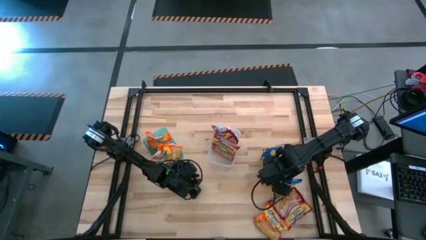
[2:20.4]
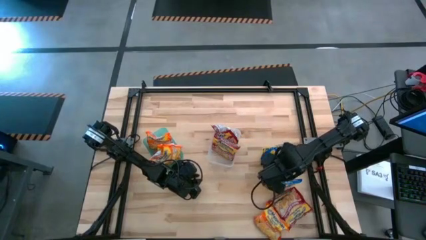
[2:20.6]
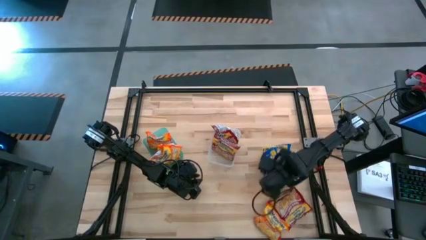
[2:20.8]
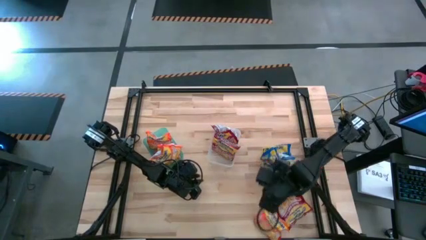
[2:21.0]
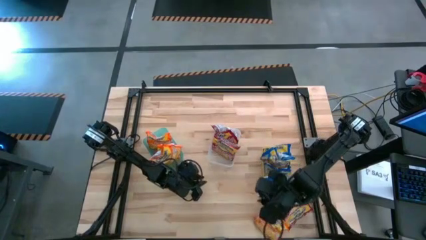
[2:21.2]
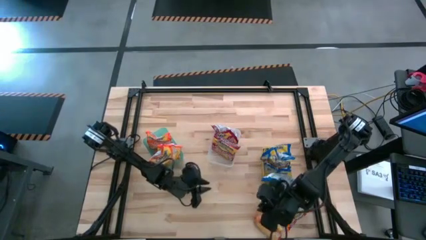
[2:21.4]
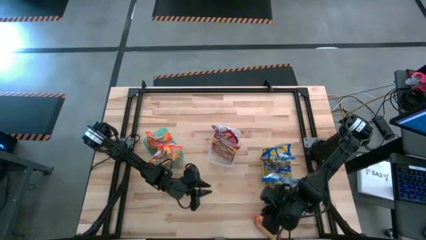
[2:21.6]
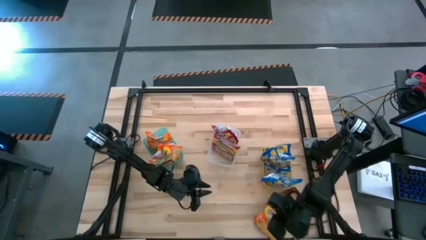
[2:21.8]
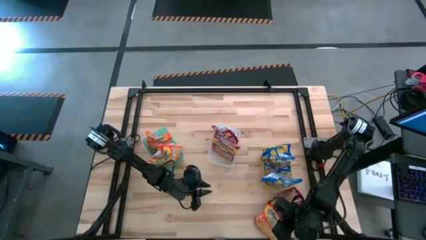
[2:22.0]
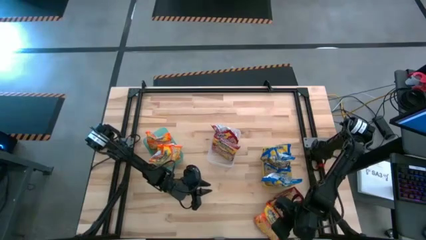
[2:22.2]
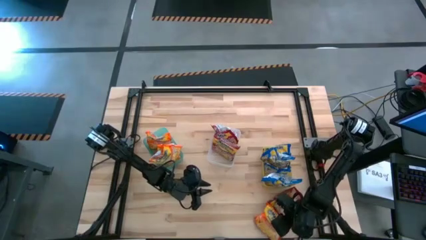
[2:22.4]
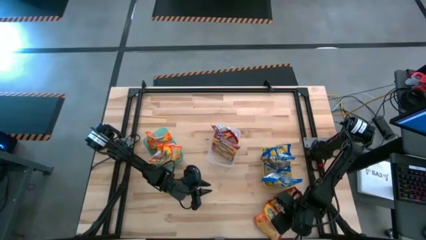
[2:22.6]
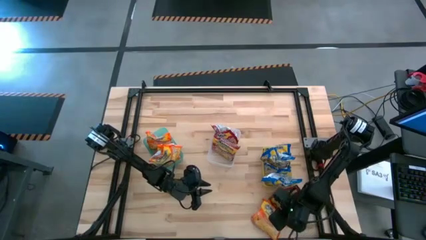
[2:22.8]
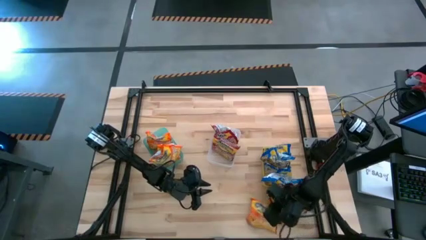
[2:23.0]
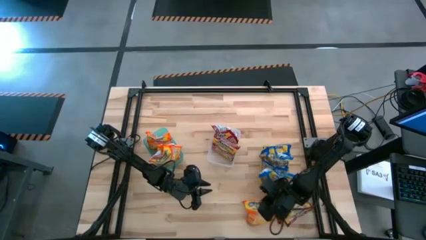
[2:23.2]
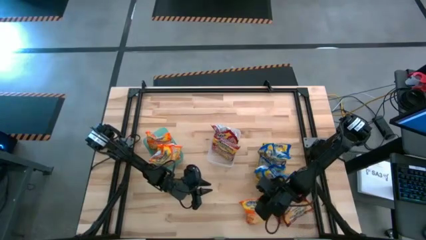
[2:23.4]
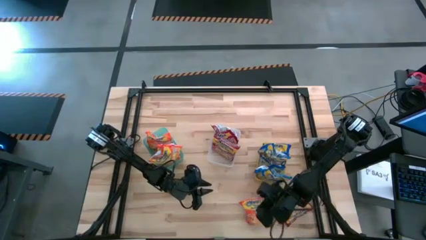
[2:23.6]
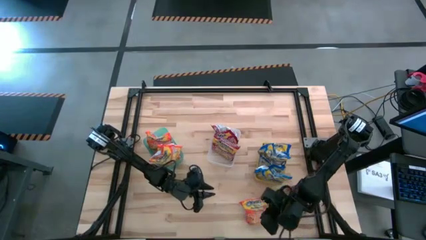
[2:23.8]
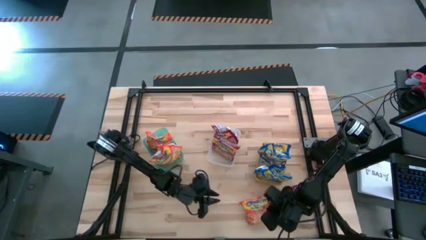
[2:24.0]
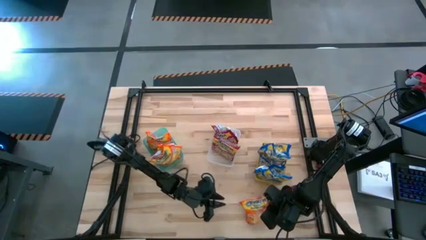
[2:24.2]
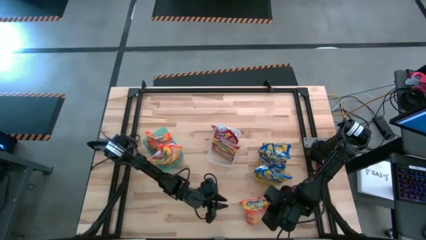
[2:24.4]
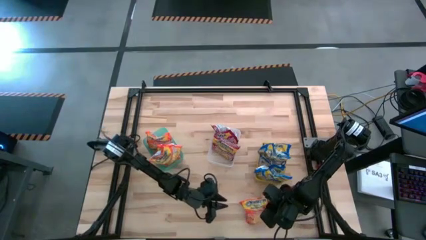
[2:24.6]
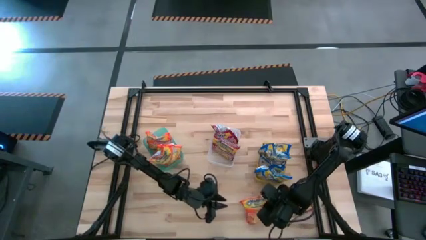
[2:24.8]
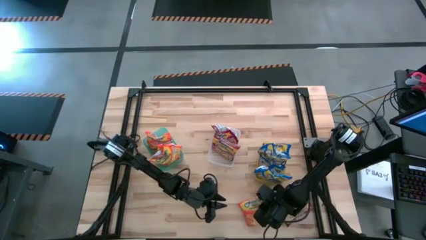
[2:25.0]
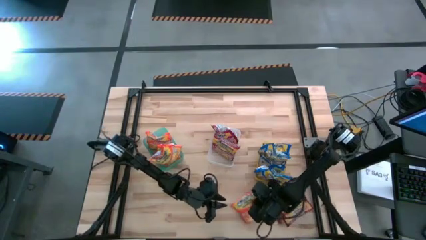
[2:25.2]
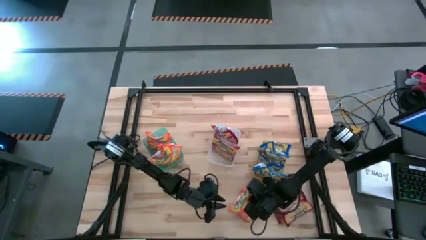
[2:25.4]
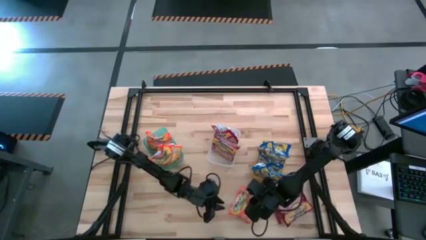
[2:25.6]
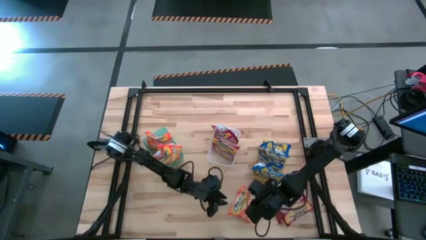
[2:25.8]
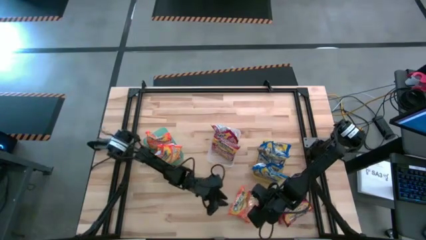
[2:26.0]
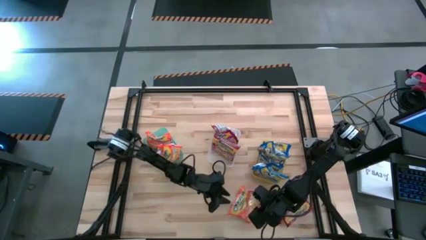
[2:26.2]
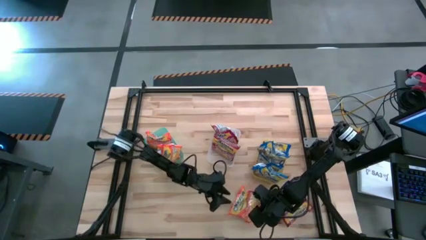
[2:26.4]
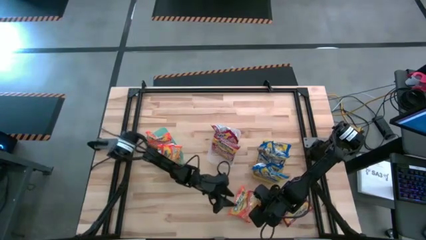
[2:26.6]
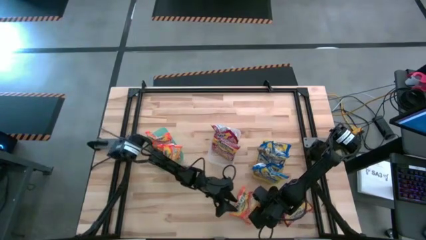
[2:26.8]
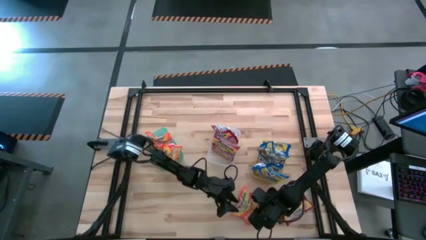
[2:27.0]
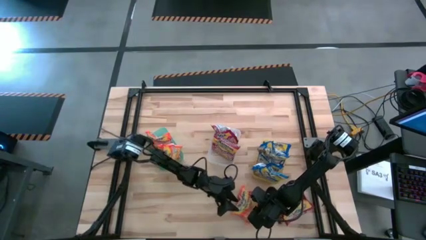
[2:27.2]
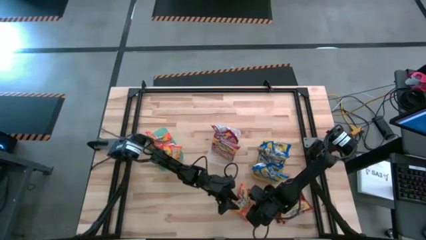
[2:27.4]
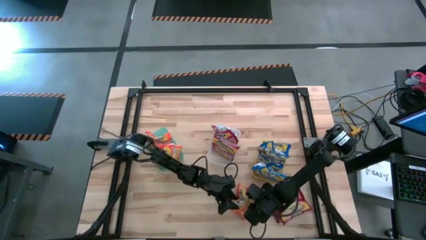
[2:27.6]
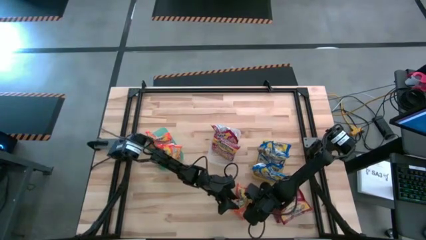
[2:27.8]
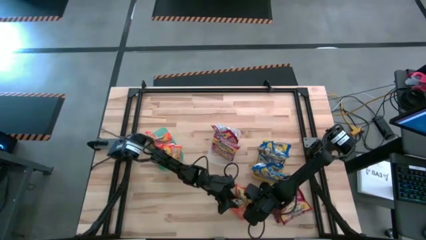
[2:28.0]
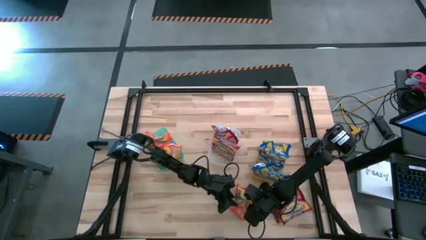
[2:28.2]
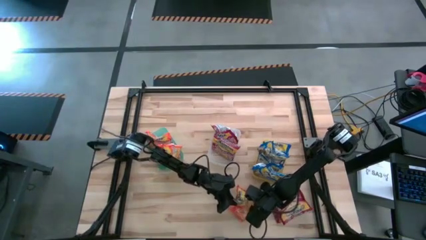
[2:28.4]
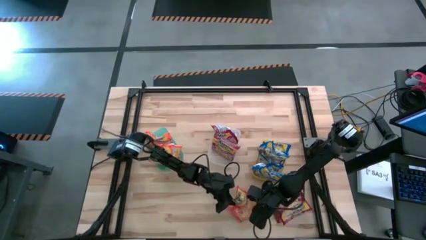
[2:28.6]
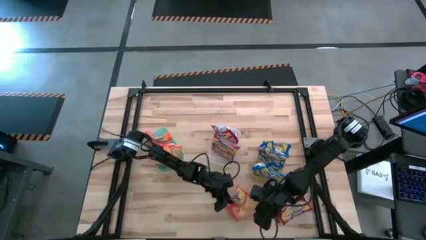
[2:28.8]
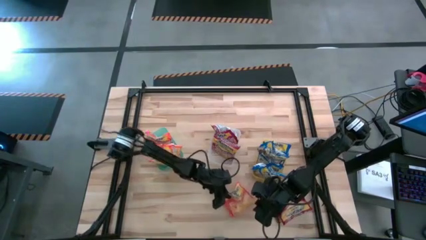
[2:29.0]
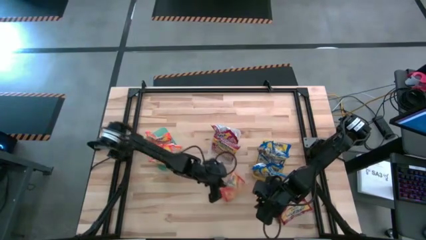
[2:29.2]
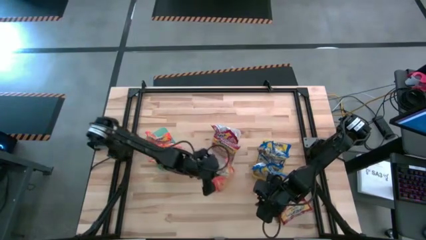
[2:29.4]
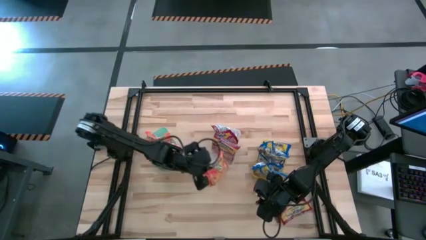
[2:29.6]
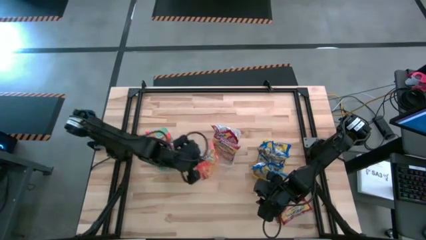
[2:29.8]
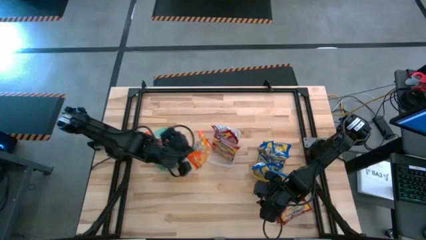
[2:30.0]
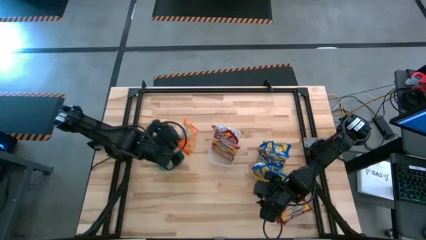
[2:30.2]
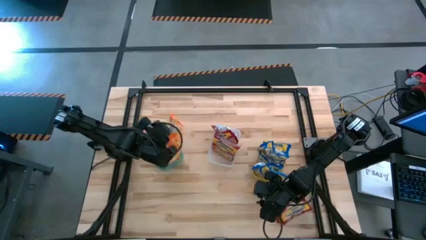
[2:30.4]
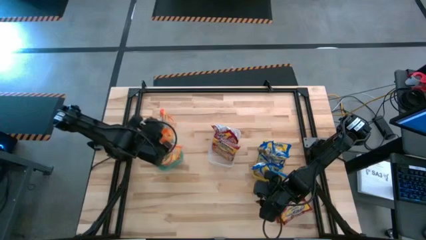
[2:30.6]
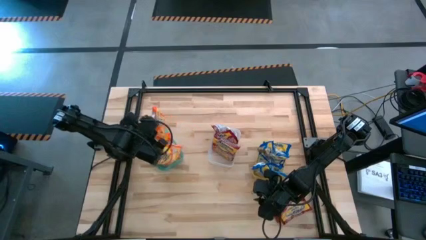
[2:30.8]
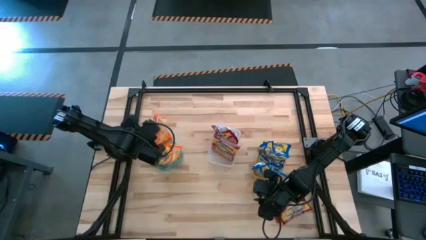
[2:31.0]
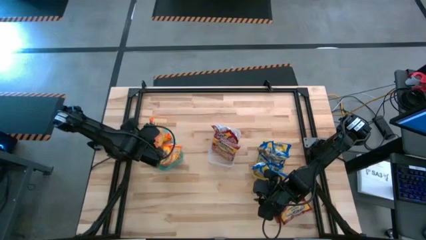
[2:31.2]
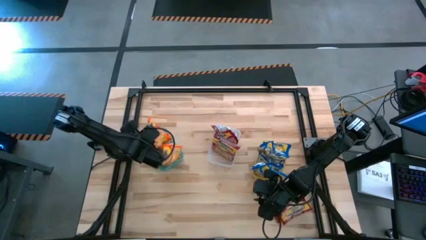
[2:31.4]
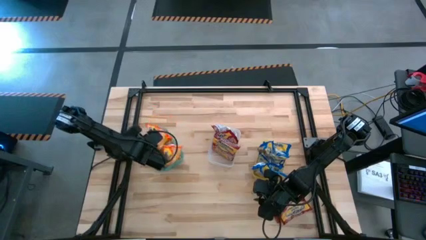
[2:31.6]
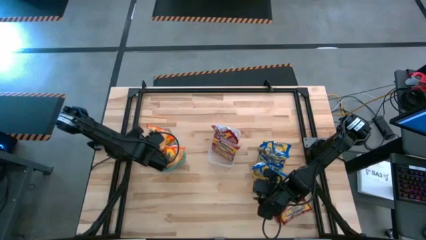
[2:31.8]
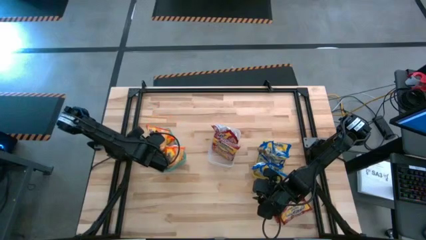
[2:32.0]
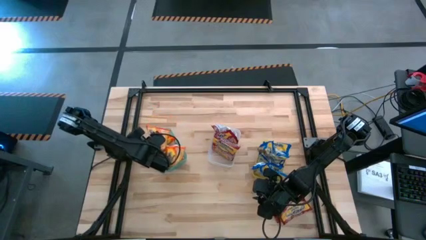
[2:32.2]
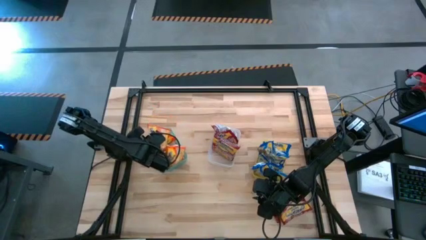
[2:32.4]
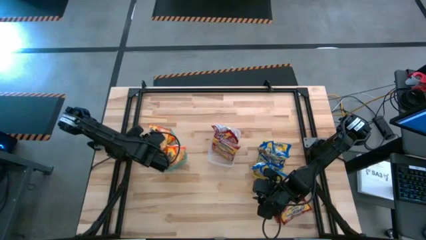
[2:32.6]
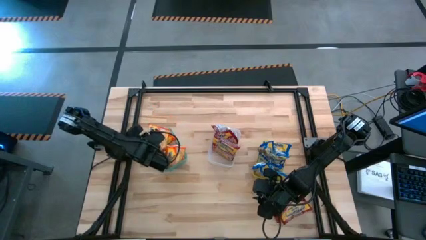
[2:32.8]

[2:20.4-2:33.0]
Task: Sort Maruchan noodles
Put the orange noodle pack into the green bin

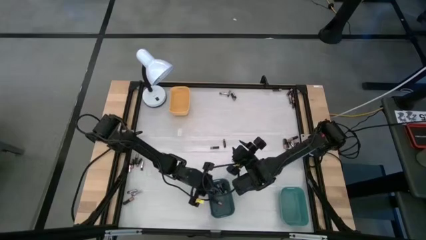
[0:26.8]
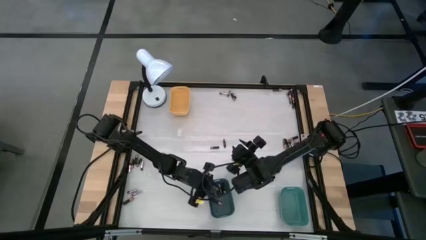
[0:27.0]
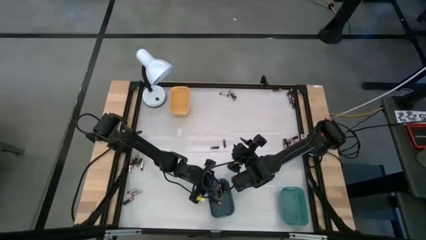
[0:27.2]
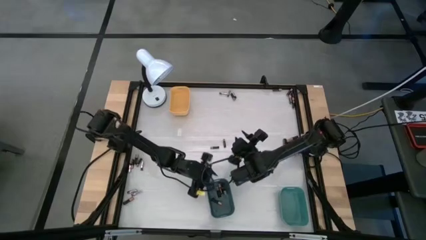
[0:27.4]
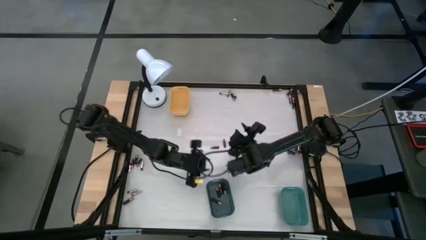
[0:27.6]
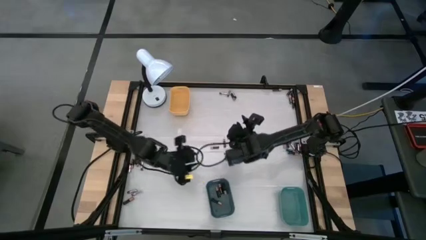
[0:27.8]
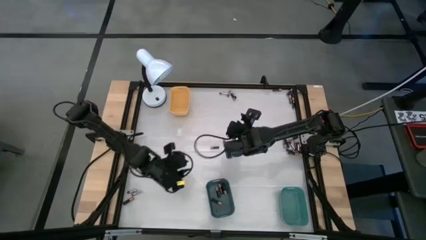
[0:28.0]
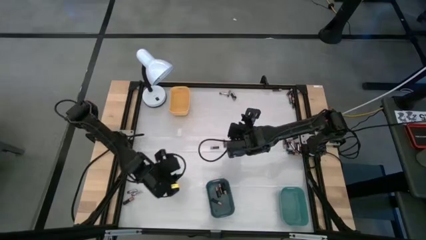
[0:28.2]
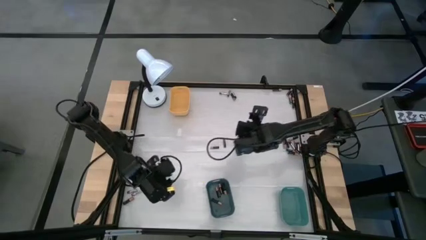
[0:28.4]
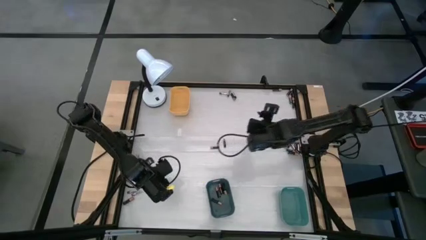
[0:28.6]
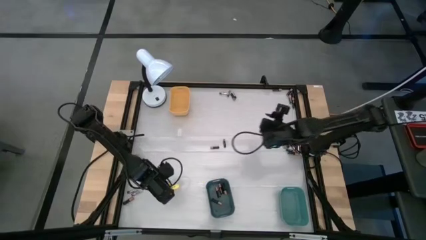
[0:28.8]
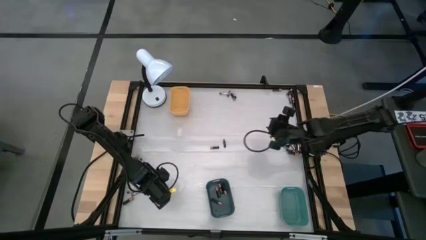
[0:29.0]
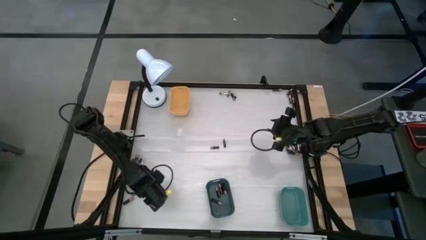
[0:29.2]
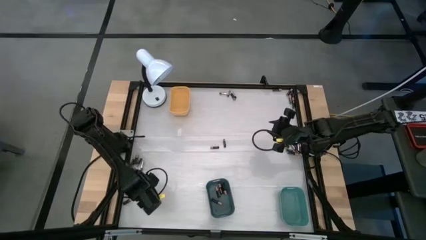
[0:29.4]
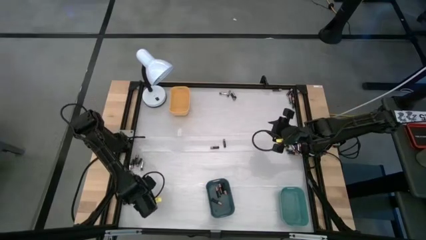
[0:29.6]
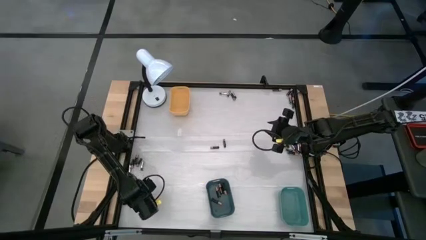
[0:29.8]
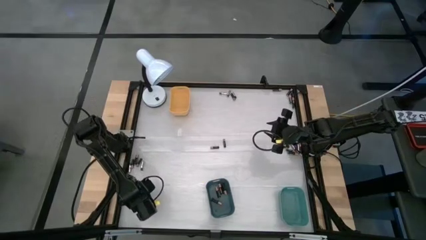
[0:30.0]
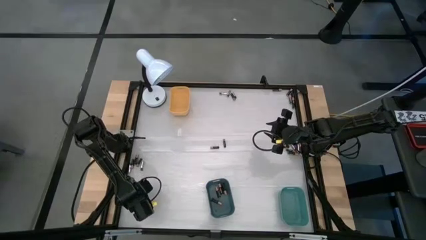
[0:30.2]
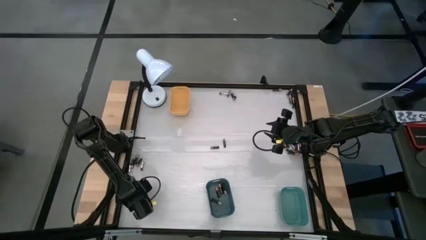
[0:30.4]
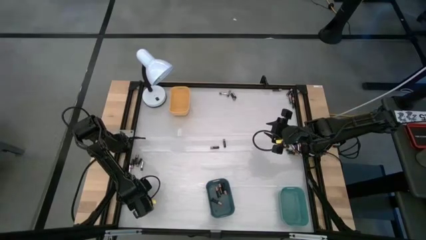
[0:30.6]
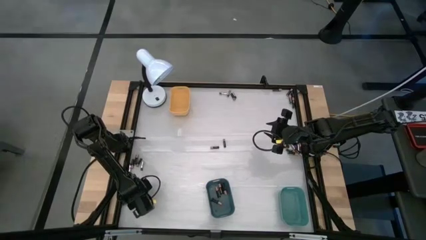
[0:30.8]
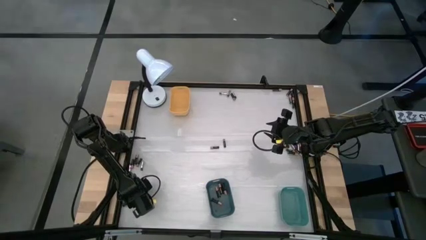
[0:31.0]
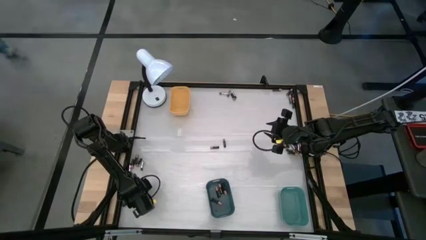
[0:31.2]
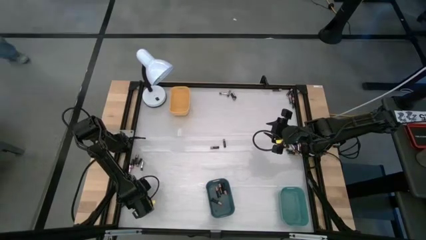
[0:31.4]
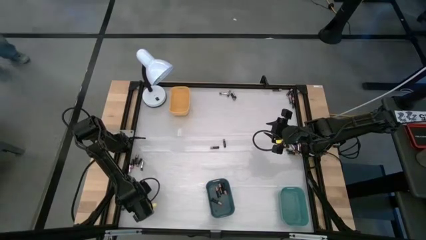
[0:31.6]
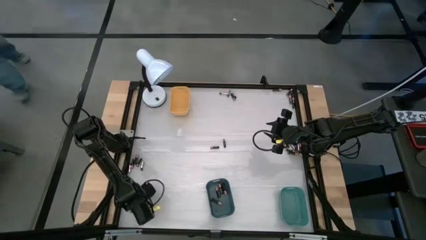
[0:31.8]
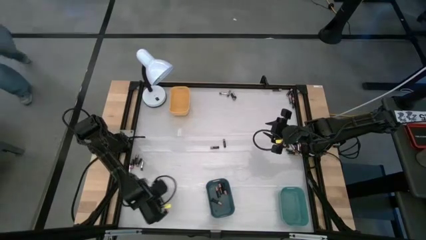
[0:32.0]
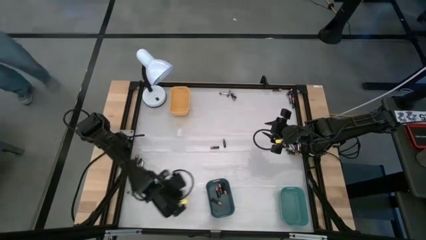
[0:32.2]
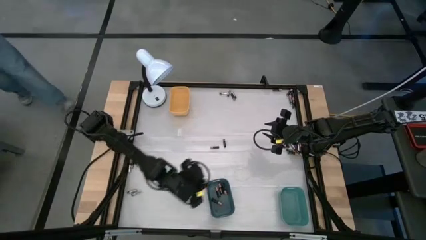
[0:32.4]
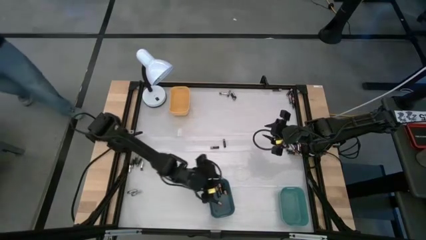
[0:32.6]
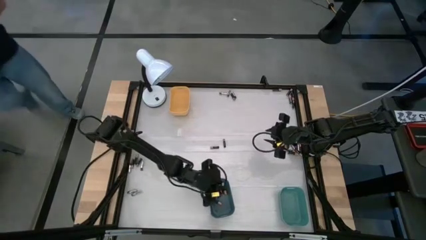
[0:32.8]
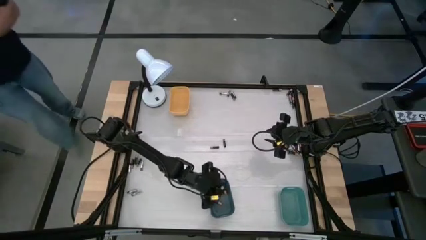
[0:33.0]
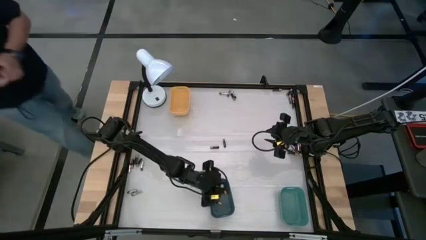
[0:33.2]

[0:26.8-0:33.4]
Task: Sort batteries
Put the black battery into the blue bin
